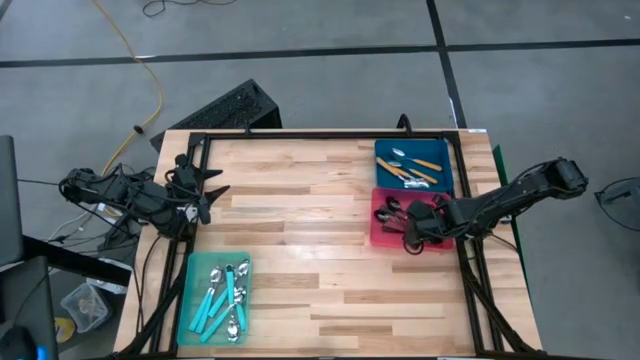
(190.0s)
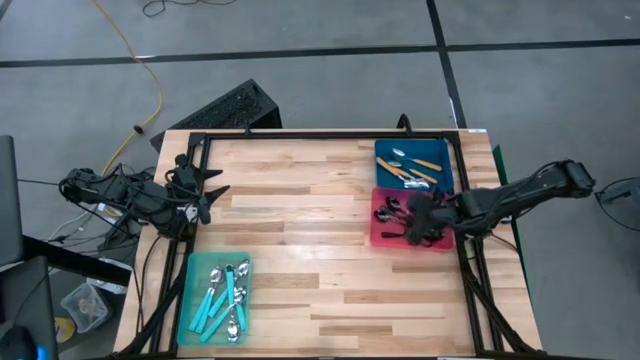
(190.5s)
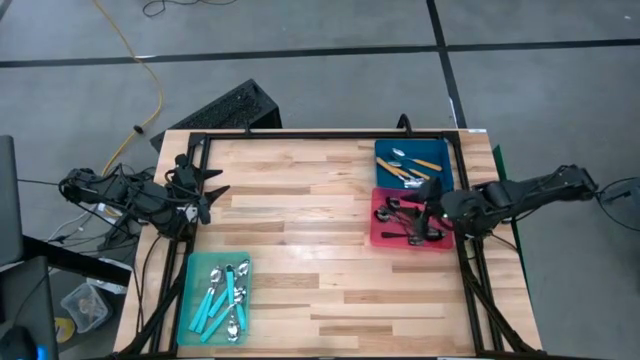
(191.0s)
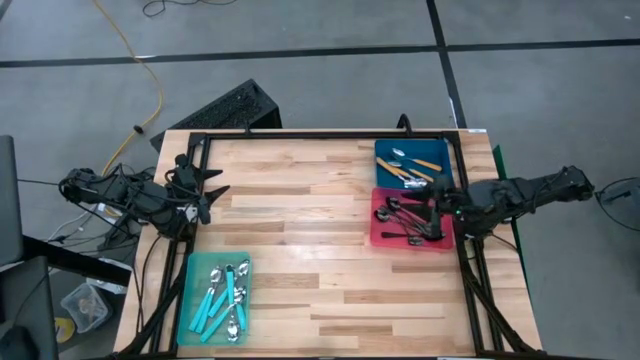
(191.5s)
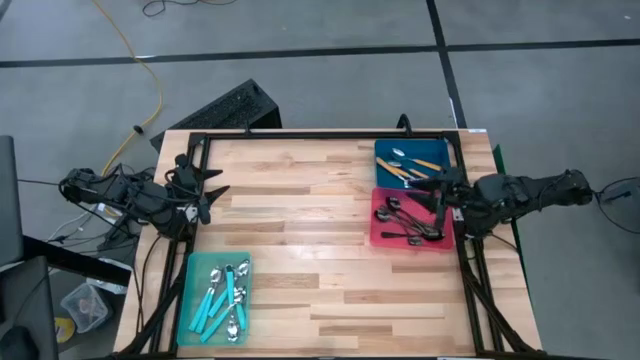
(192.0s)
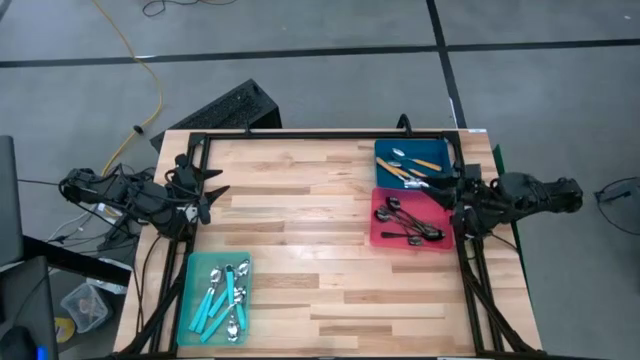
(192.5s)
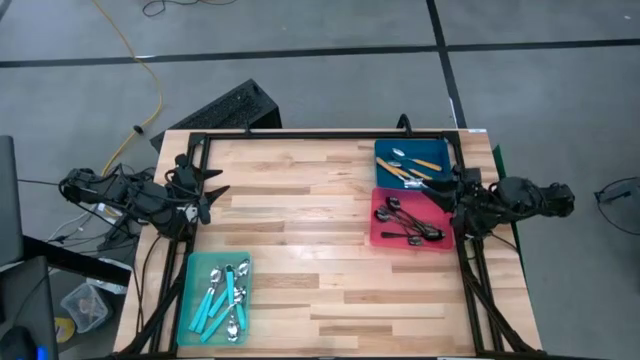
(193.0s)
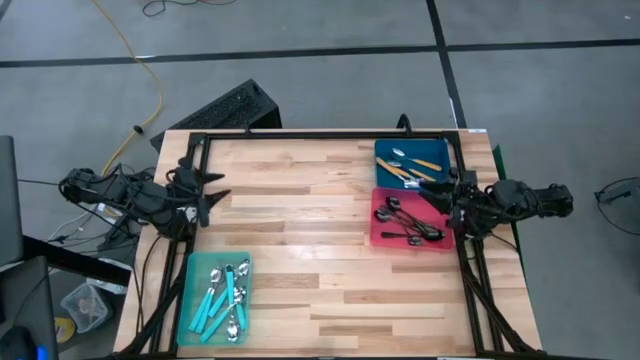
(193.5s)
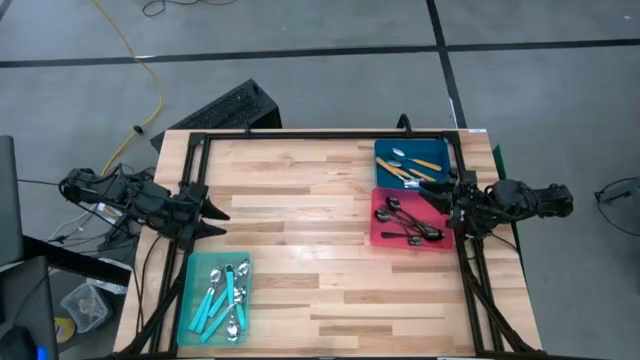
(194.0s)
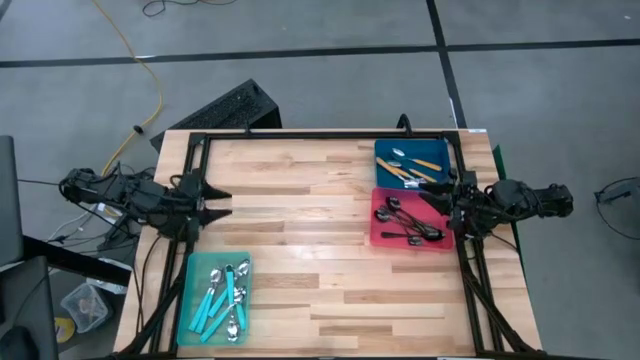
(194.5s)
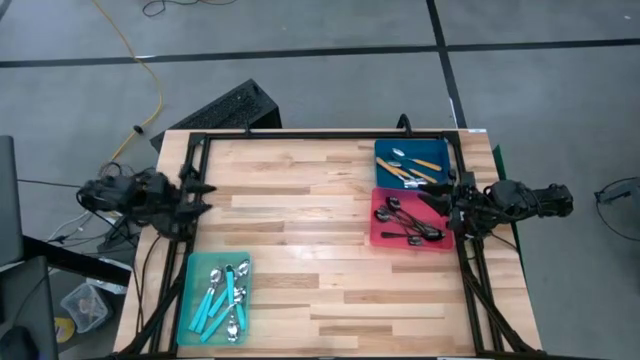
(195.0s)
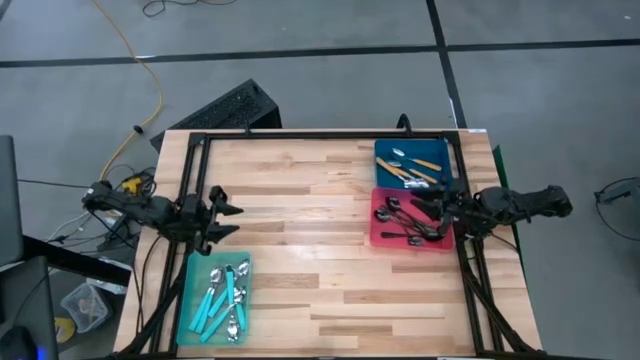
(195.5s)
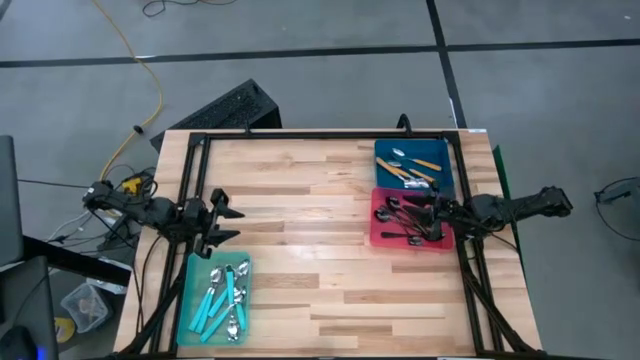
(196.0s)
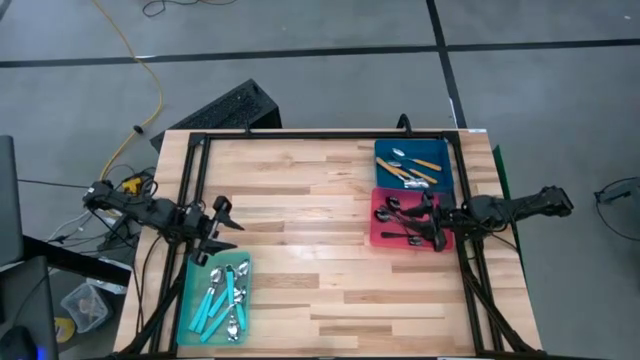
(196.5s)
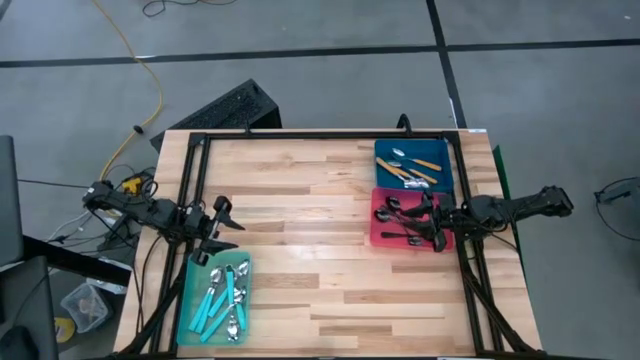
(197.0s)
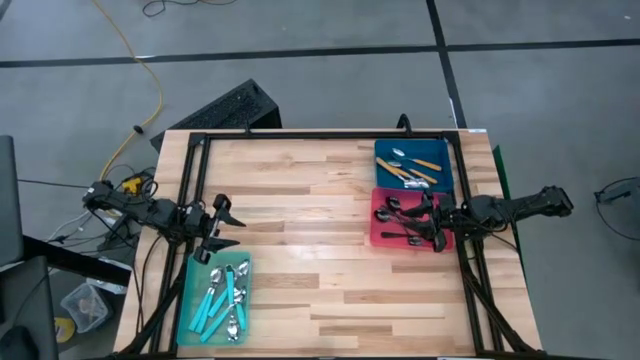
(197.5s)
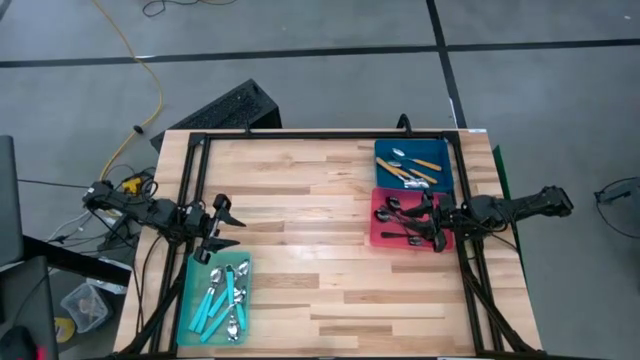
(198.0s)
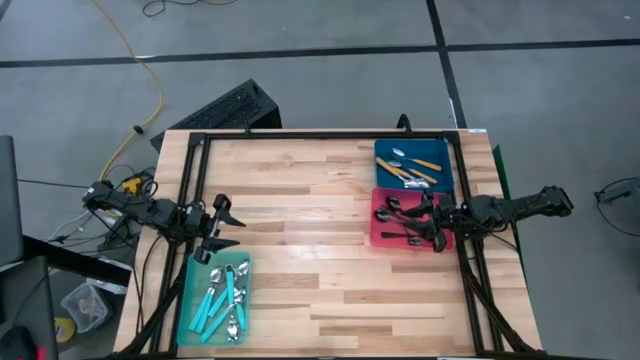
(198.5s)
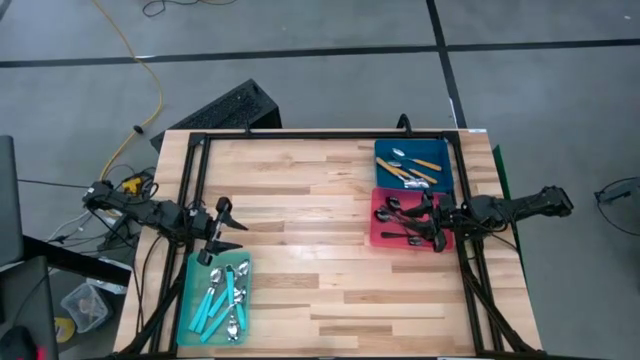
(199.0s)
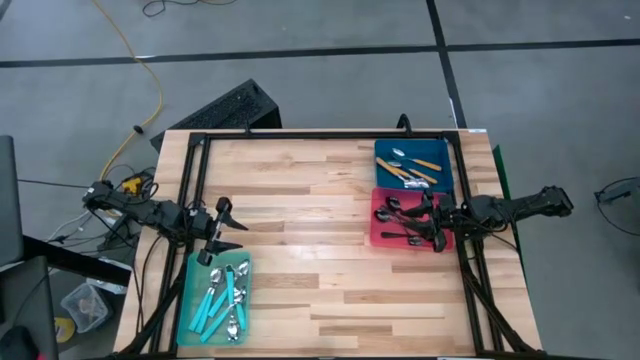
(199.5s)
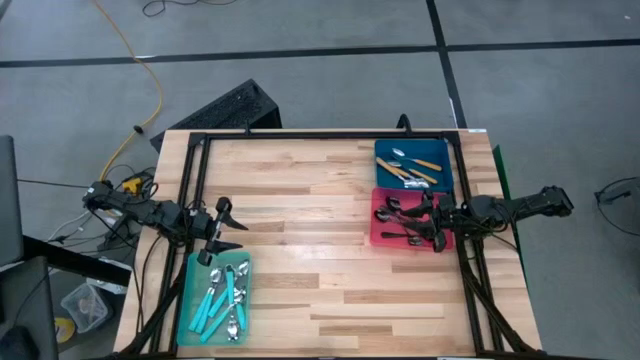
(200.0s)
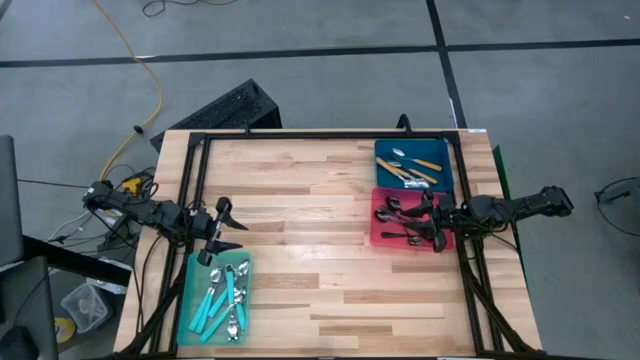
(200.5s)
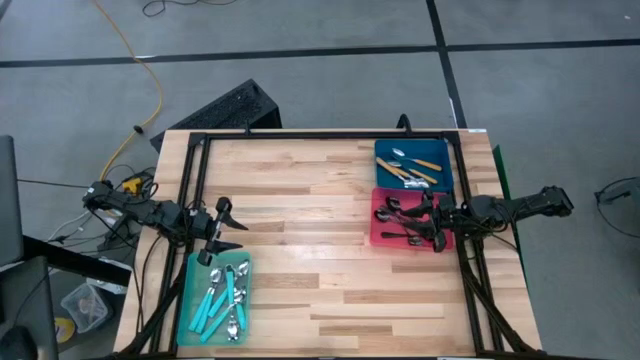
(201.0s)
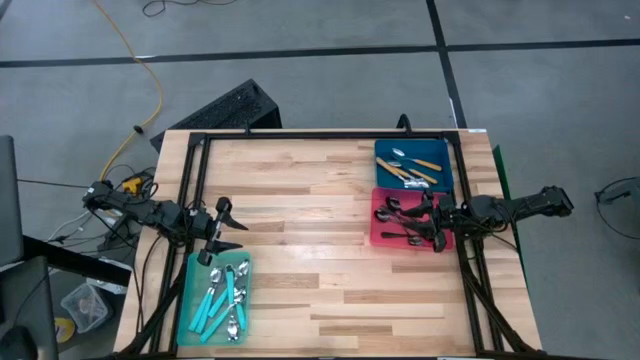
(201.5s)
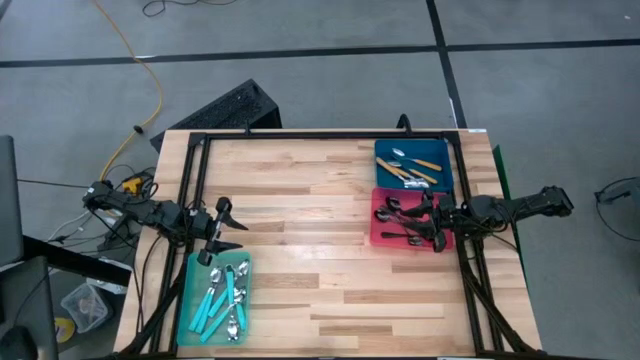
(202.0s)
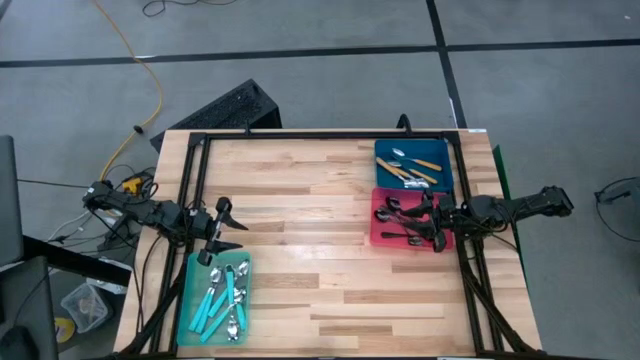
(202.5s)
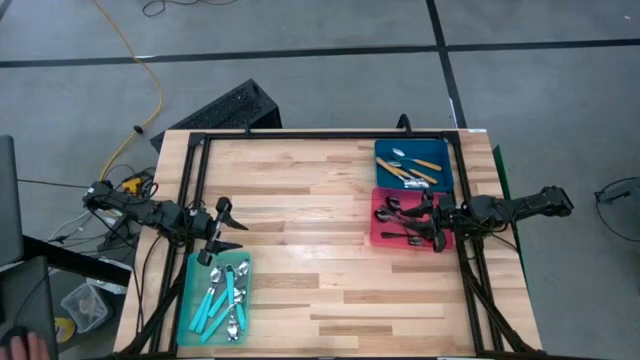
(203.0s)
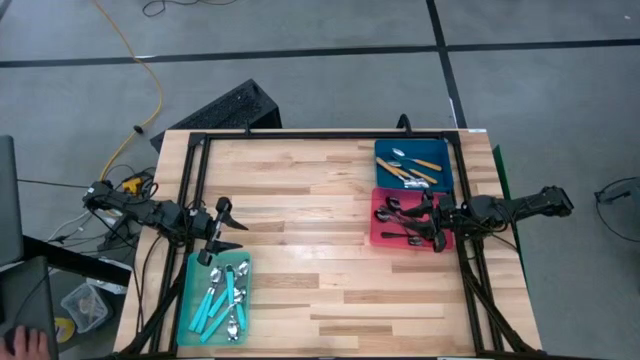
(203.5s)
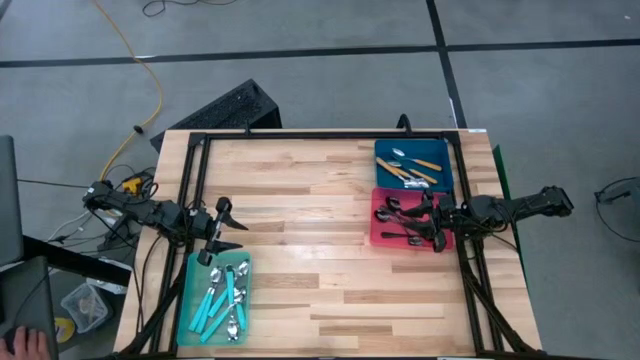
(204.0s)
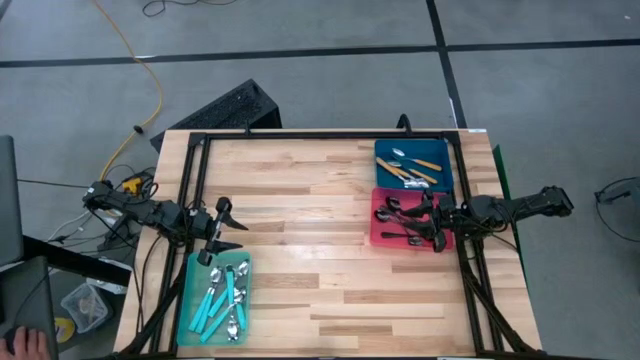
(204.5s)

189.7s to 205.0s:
Task: Sort silverware by color (type)
Return to Home Position

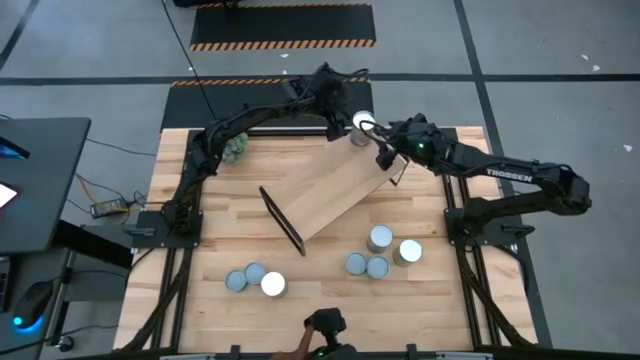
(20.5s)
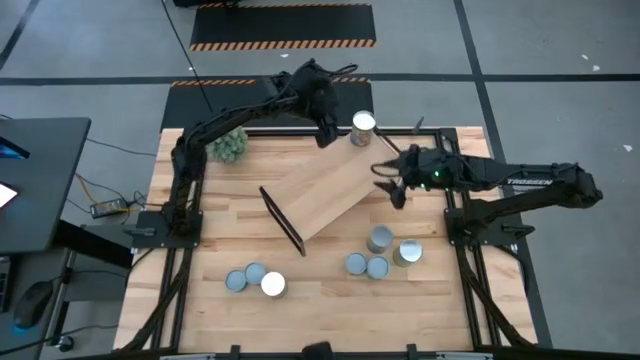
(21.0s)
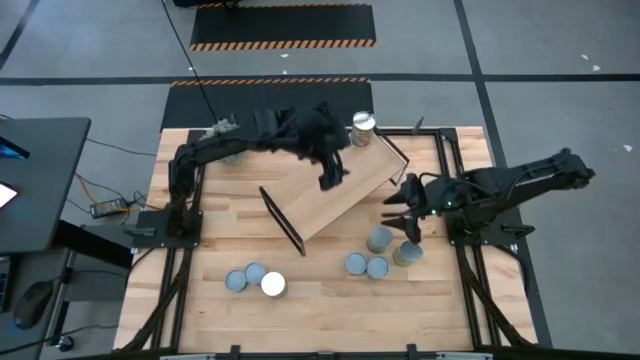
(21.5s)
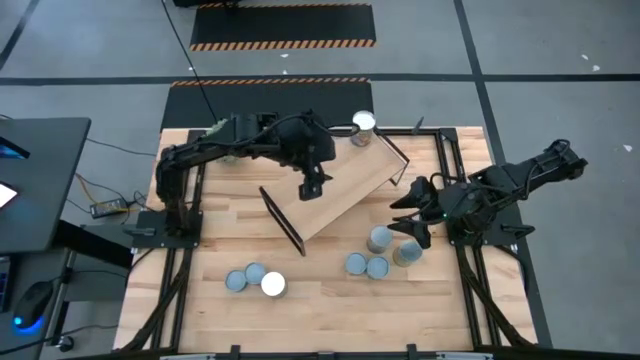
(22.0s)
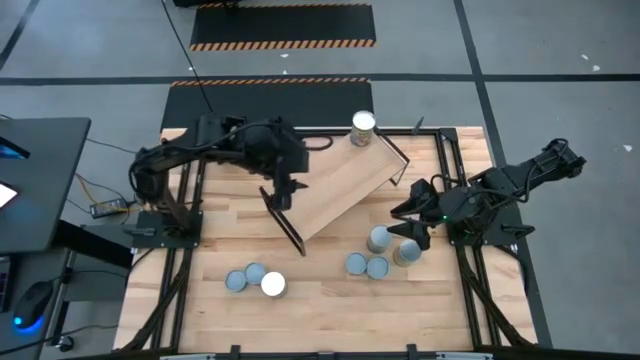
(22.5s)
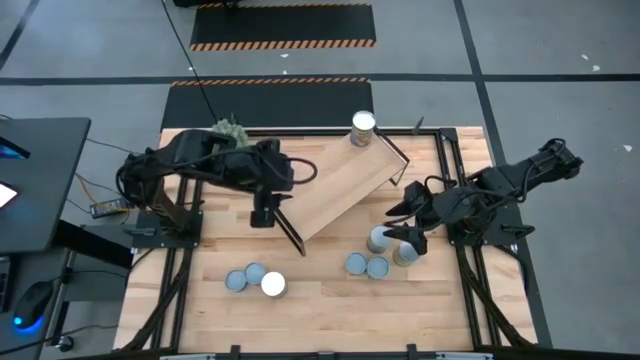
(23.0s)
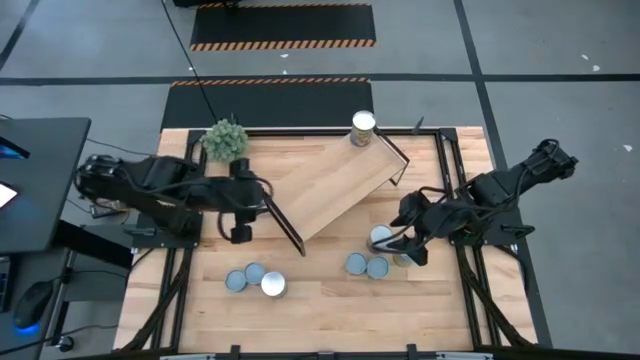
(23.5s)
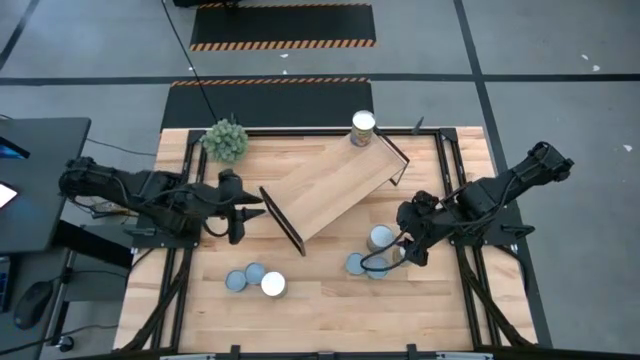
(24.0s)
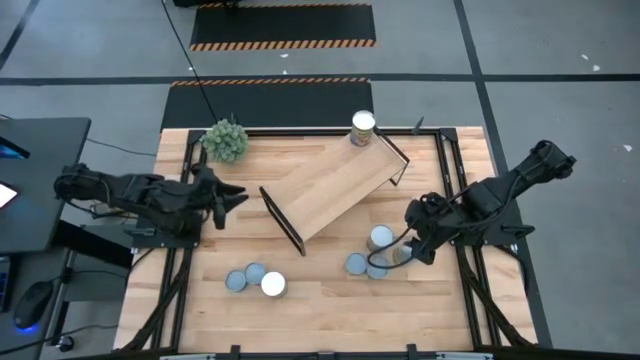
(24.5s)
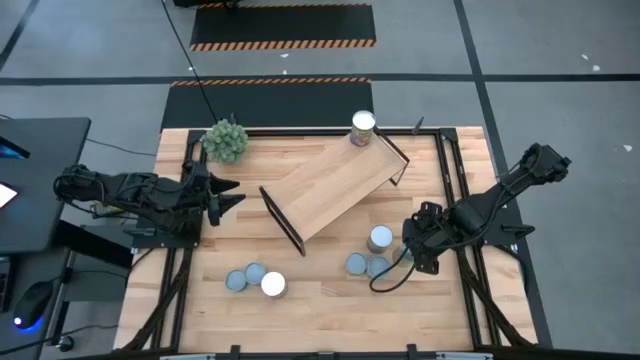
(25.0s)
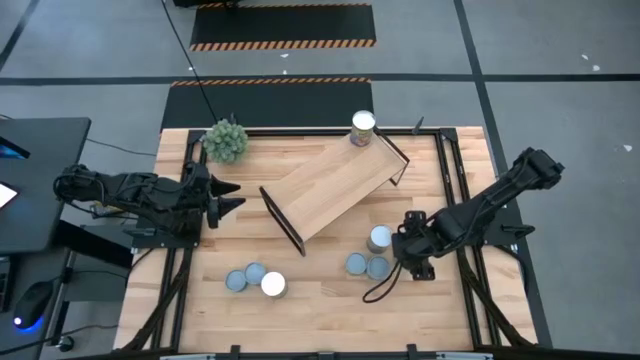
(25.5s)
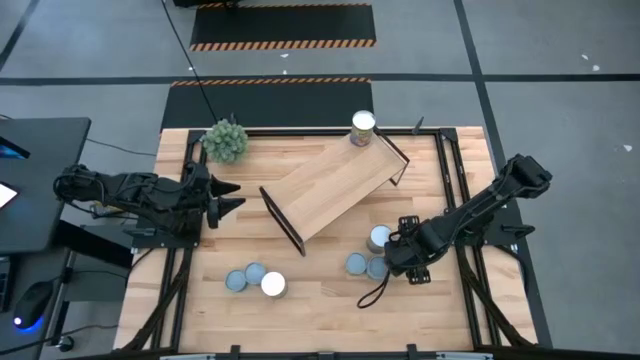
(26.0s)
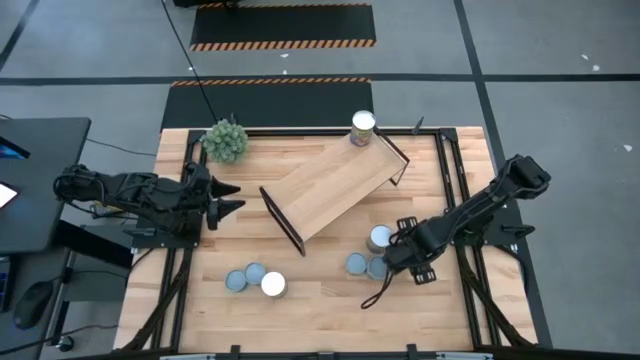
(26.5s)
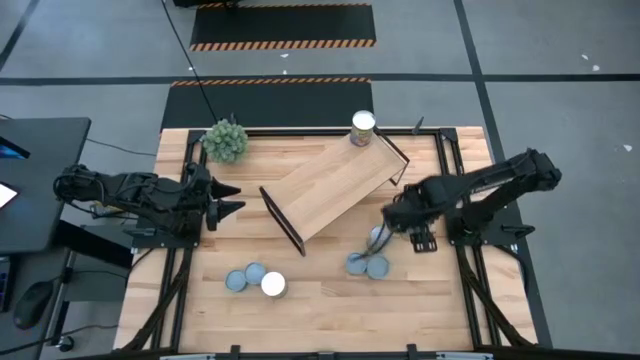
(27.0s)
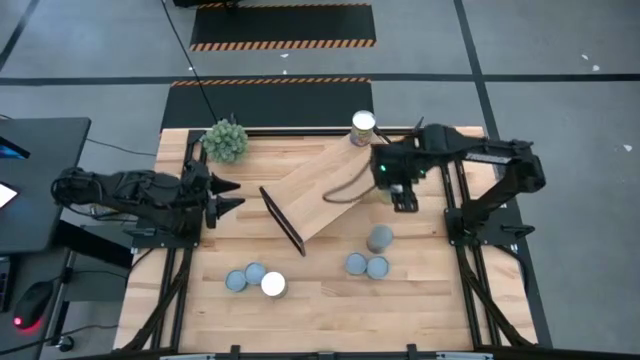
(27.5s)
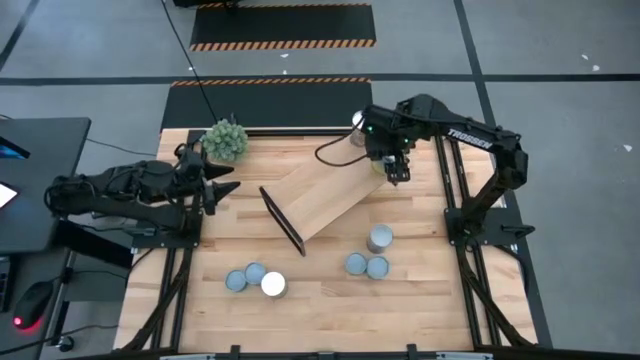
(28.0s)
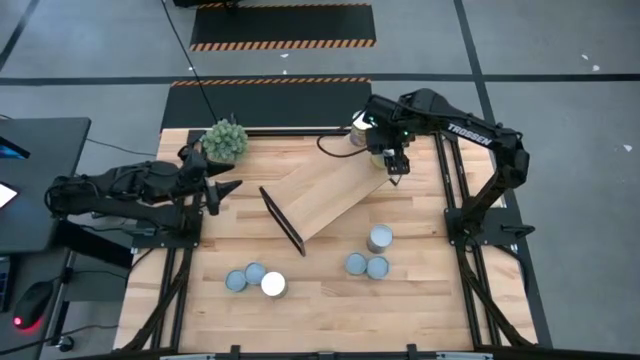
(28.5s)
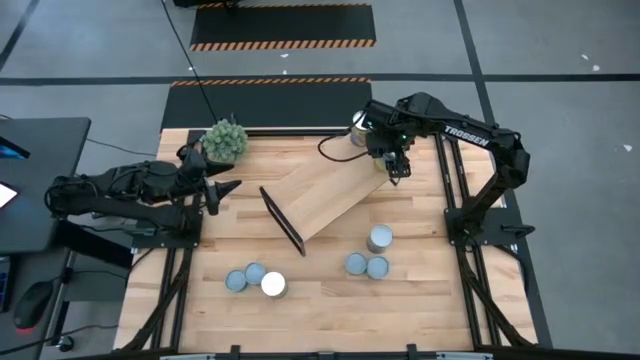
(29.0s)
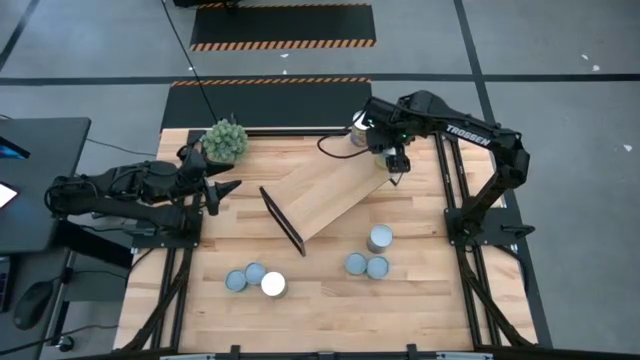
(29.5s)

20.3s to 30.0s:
Task: Pick and place cans onto a shelf
Put the canned carrots on the shelf
